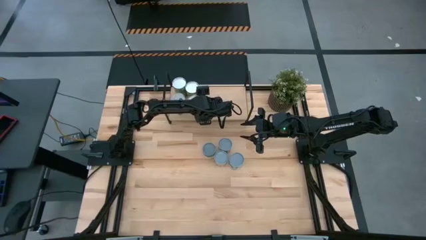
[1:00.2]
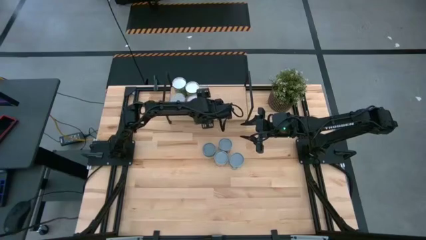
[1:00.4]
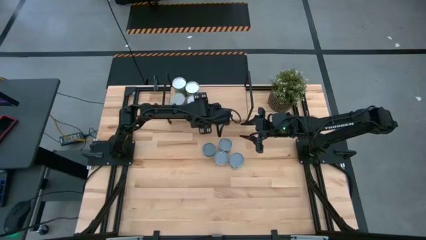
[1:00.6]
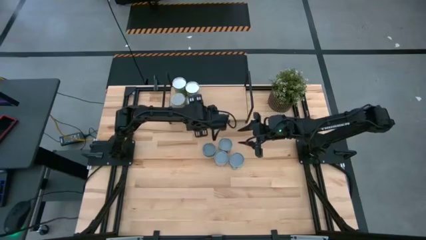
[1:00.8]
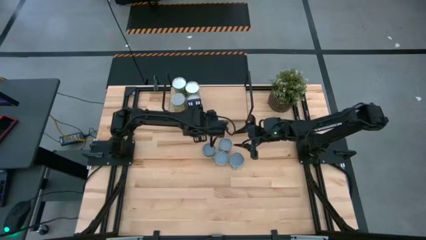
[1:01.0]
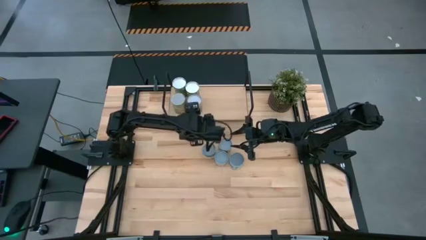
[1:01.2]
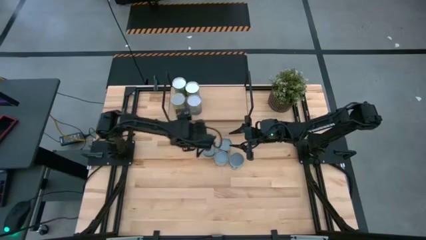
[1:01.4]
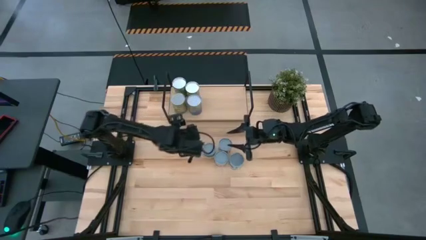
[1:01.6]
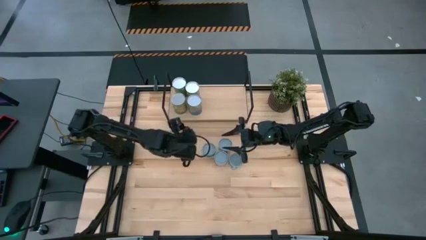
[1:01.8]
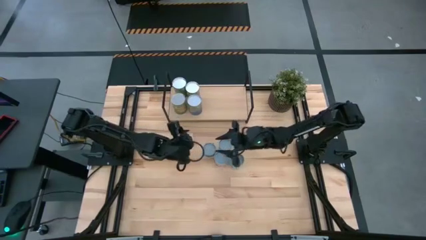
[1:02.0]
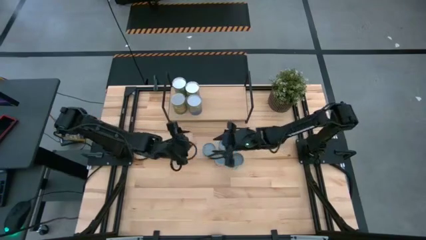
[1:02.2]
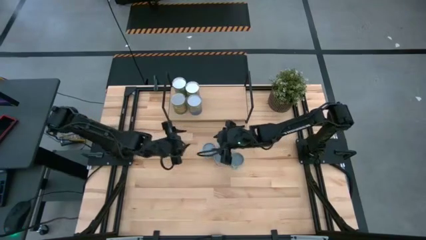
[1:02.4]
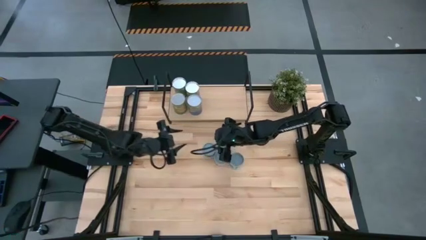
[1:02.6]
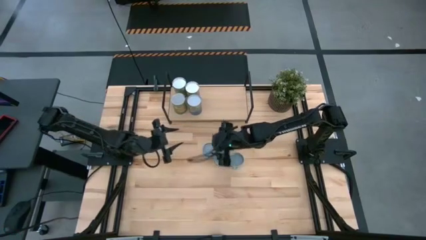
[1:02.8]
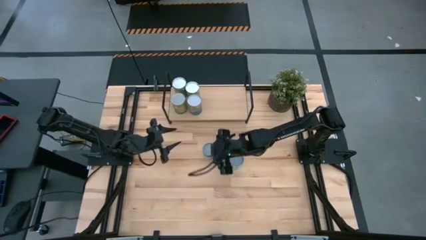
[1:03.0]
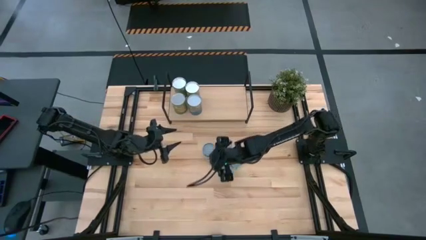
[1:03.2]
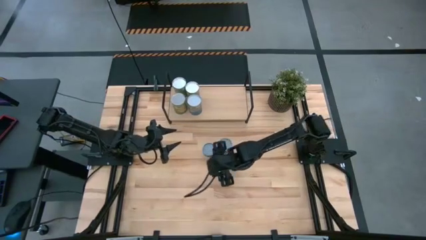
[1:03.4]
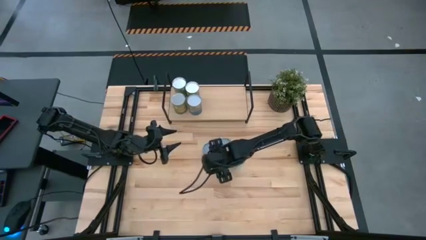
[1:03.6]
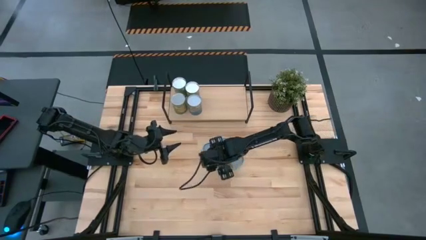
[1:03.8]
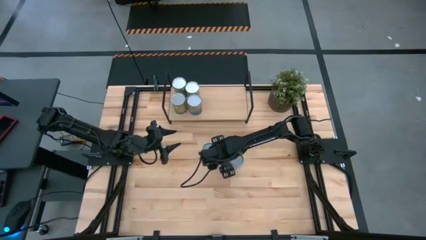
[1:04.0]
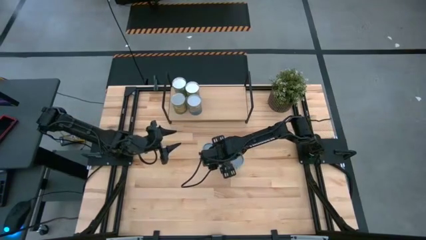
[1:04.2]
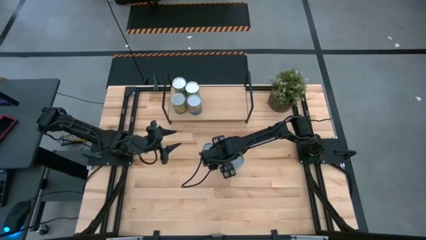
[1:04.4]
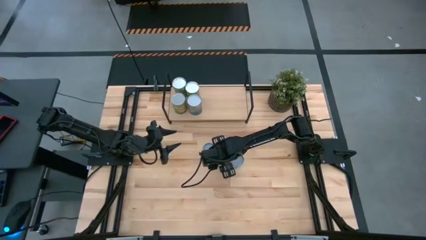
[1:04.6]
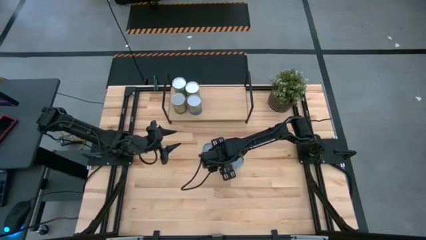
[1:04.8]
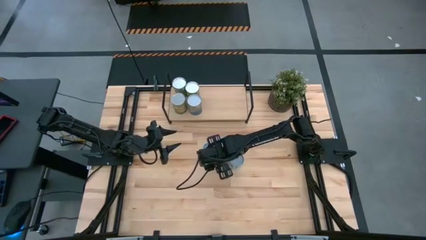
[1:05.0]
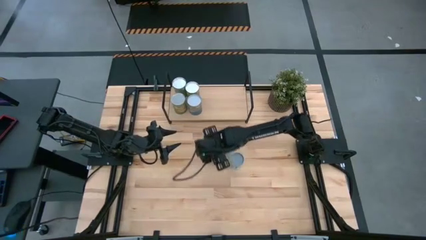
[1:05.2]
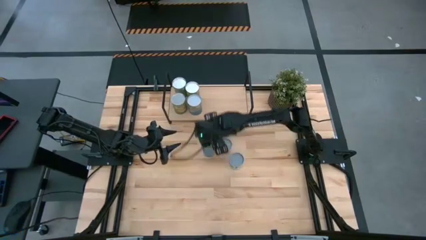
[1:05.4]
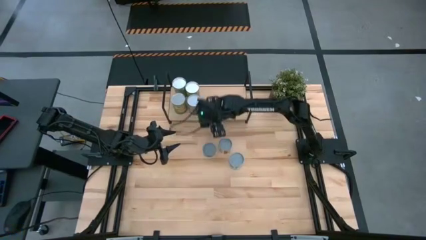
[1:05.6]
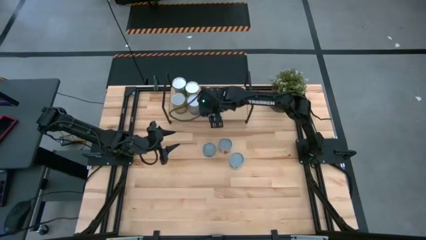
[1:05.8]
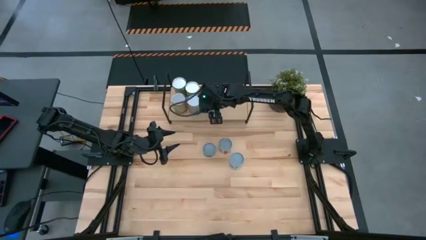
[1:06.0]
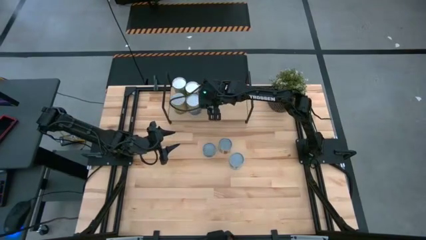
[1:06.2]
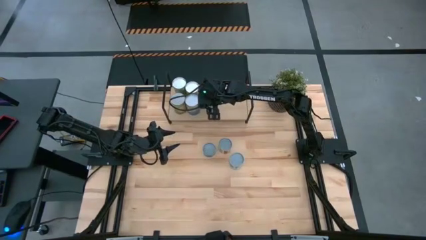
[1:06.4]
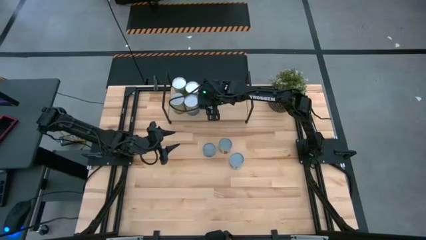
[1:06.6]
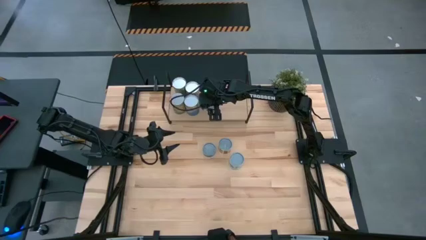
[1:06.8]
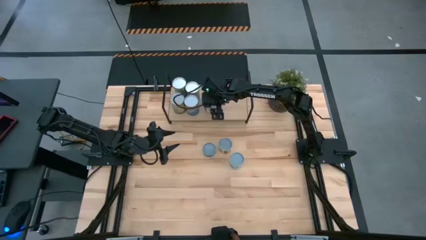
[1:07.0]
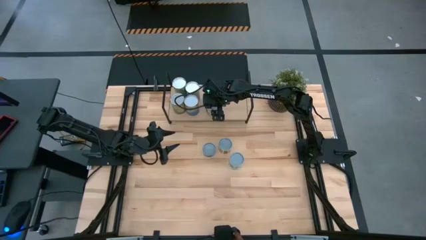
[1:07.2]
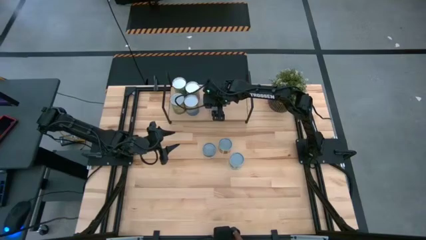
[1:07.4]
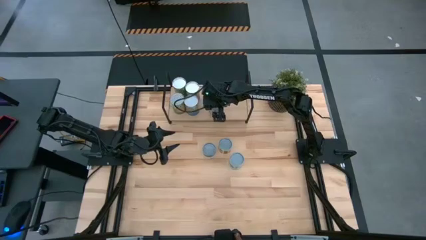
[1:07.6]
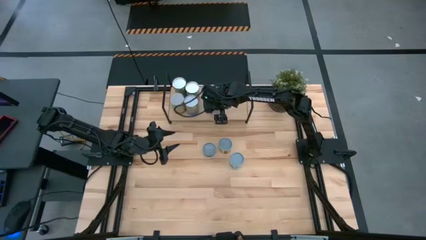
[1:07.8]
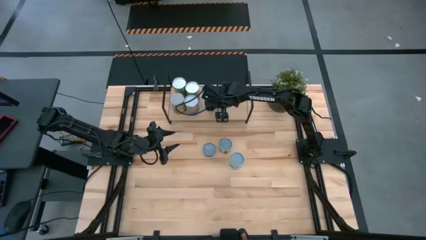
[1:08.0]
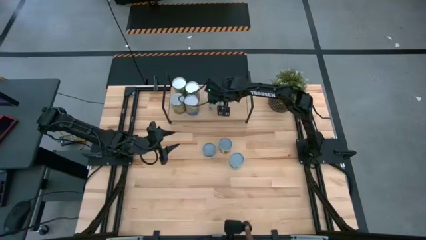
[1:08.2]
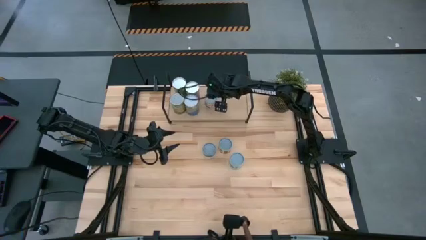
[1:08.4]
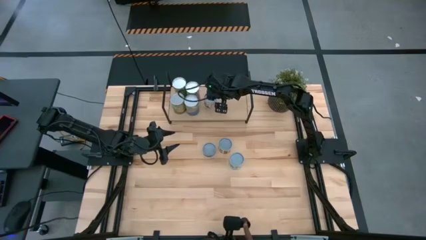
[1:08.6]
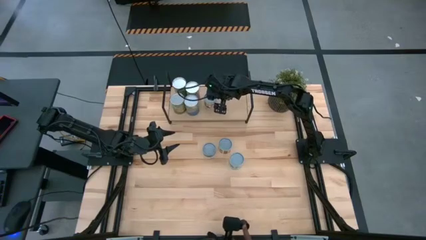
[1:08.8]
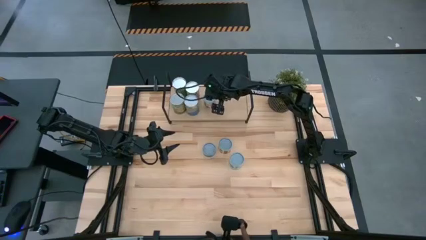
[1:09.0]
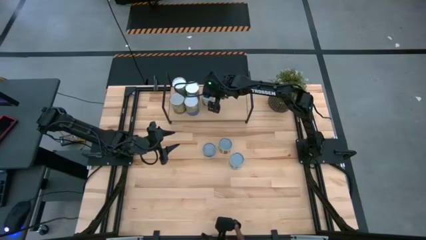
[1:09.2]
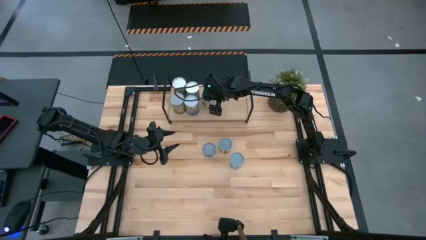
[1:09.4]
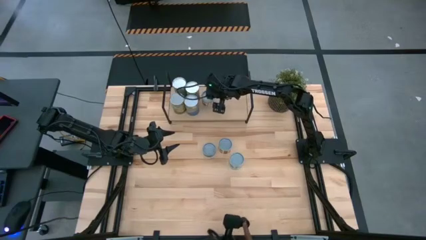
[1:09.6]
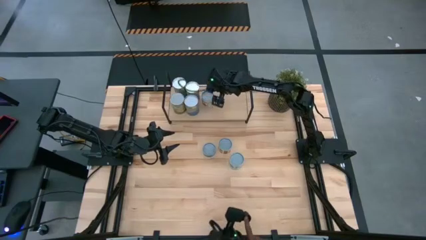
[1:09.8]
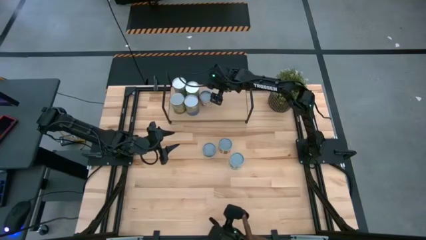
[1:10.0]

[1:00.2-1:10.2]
Task: Pick and place cans onto a shelf
Put the small canned peas on the shelf
